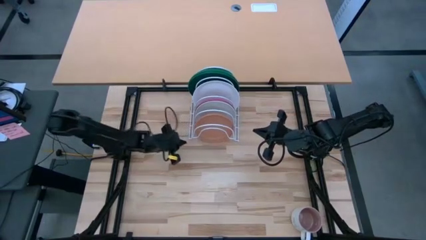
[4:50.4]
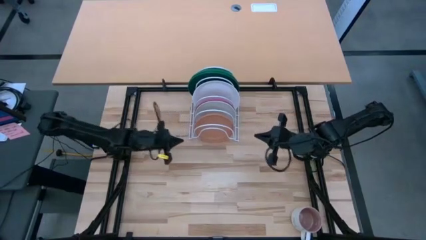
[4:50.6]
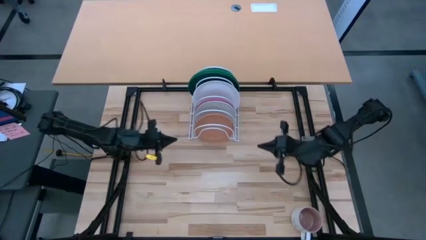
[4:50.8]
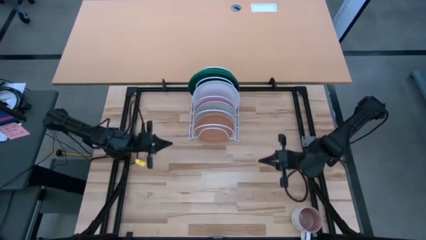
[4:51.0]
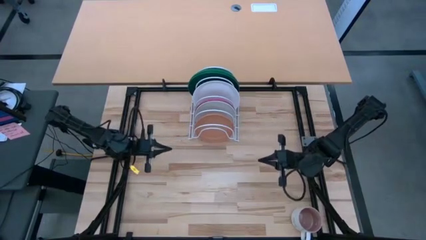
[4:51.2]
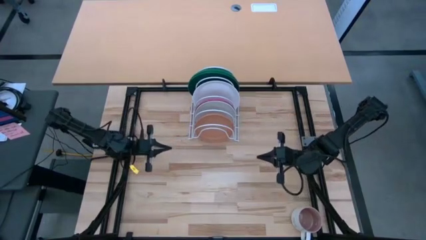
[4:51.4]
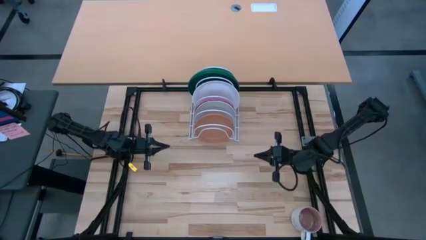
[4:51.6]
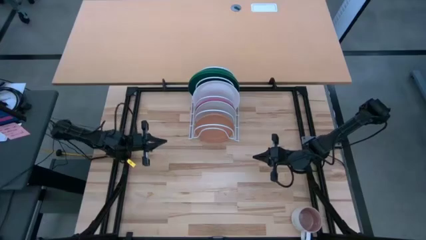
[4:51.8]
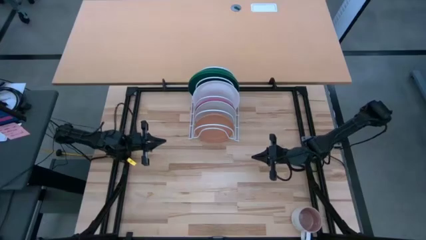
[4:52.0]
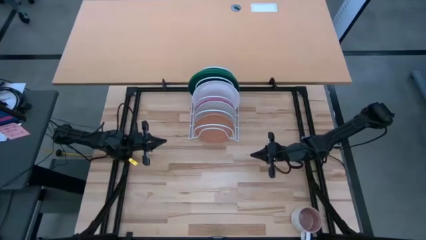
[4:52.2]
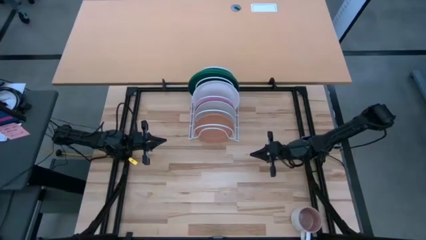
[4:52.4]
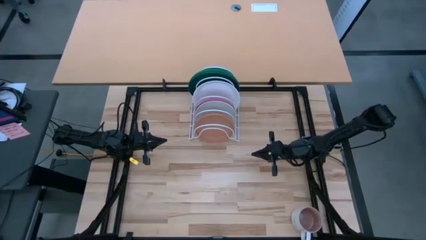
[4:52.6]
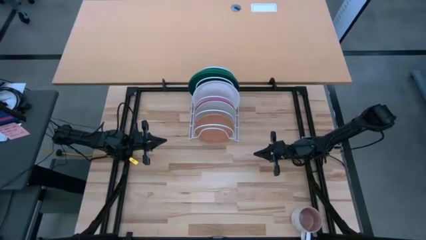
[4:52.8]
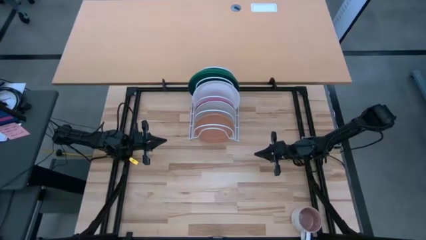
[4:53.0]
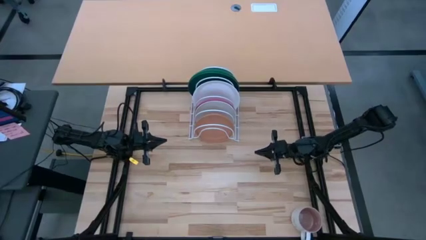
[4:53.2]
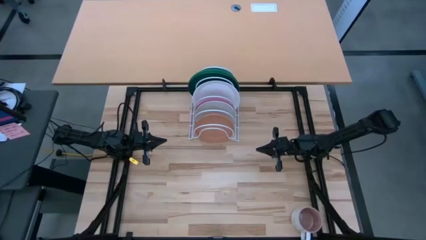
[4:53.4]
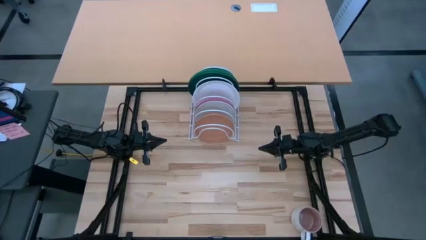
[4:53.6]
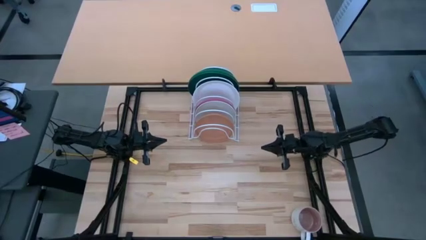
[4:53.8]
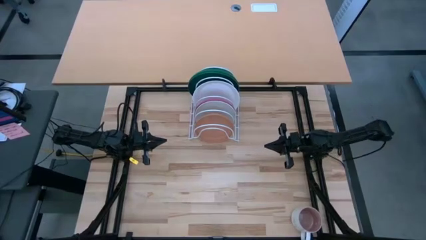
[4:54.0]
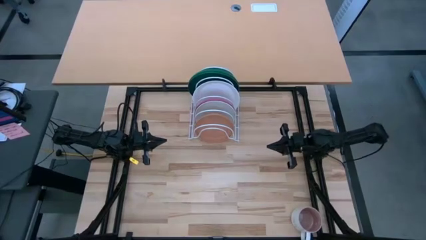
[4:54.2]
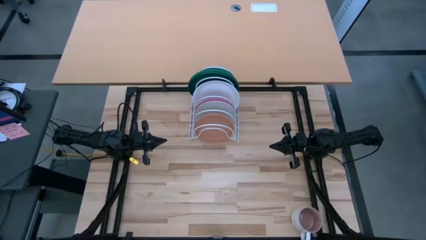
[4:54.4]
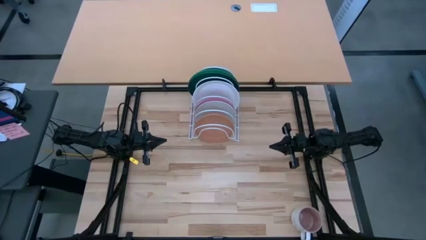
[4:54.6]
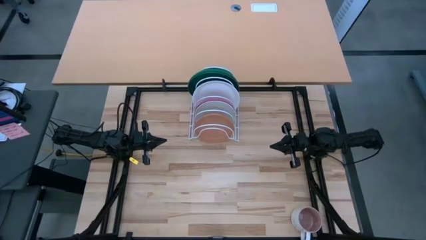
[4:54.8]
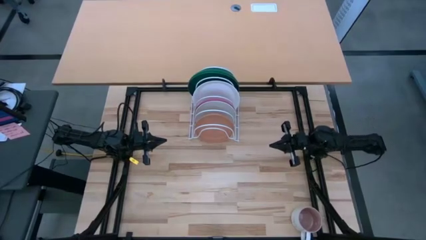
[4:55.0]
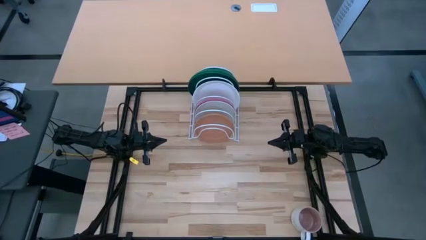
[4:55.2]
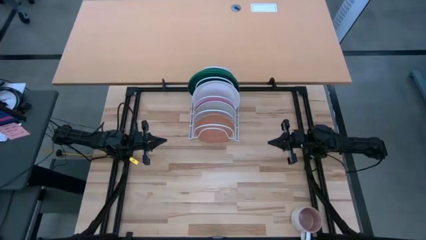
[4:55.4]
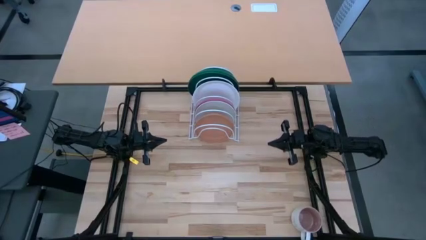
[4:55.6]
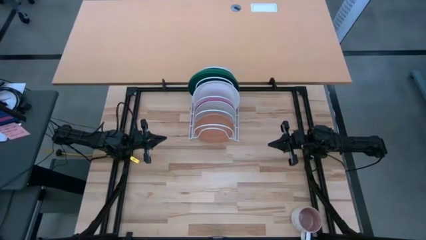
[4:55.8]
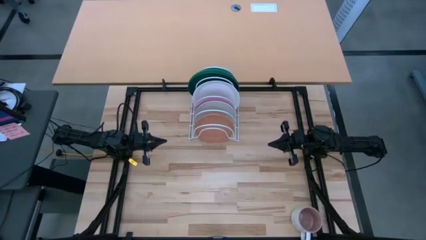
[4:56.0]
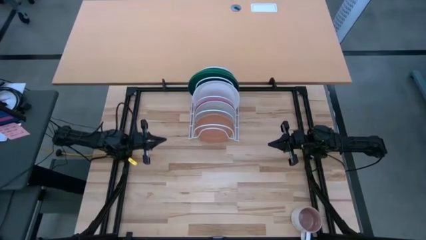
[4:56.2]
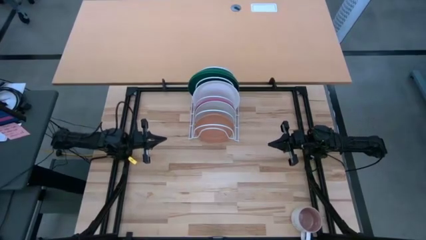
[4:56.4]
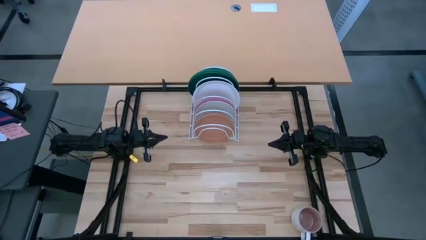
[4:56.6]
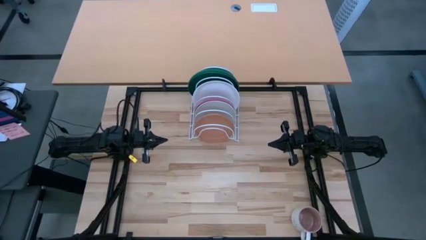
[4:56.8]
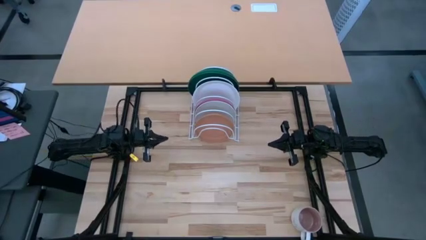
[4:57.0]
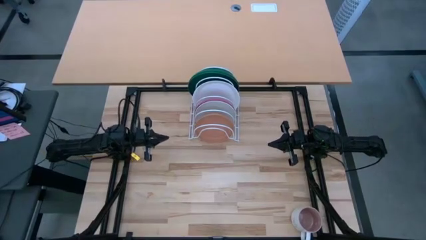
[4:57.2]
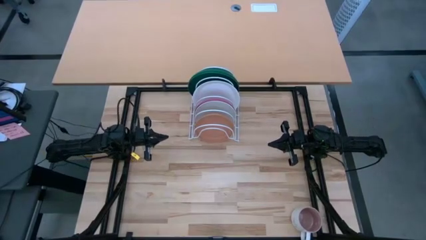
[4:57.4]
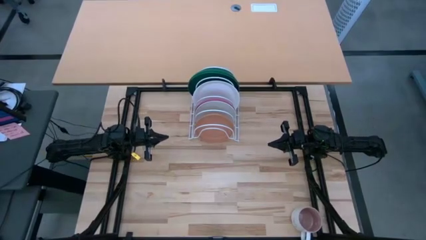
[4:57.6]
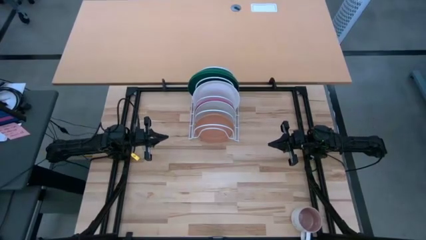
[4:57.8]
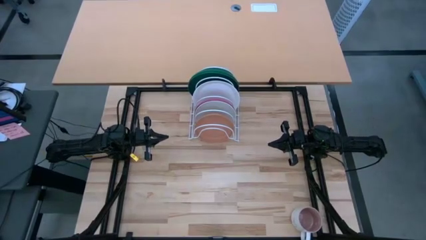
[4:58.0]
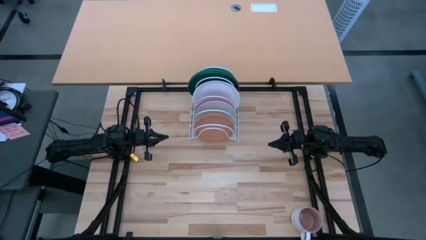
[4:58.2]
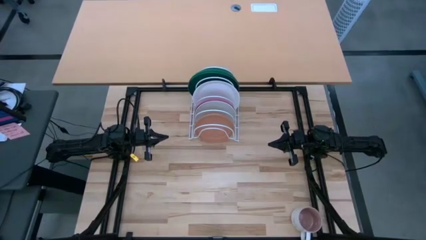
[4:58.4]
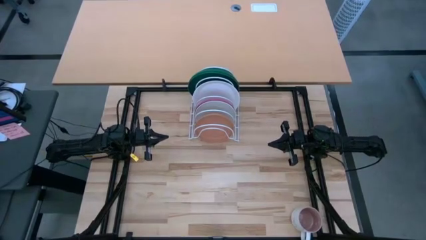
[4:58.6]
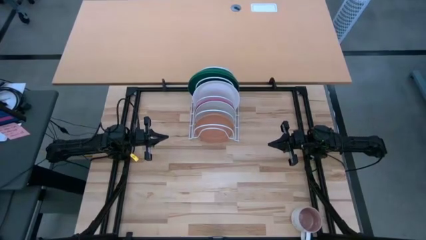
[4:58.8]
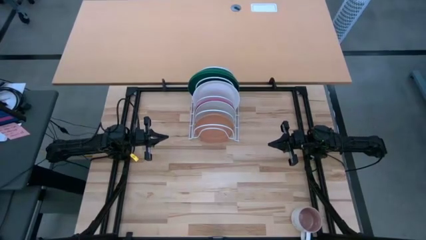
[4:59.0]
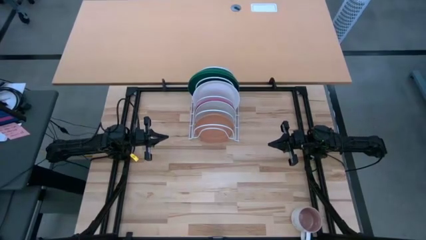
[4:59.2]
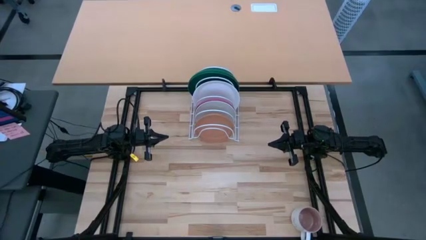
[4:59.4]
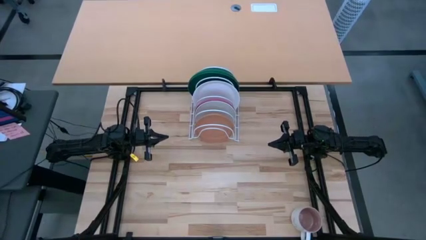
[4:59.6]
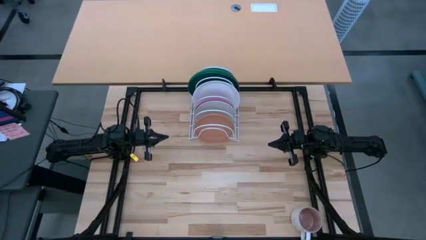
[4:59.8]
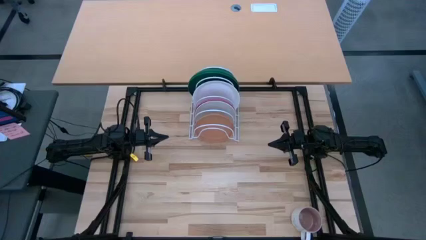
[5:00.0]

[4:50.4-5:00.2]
Task: Sort dishes
Return to Home Position

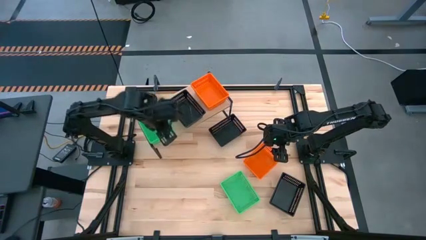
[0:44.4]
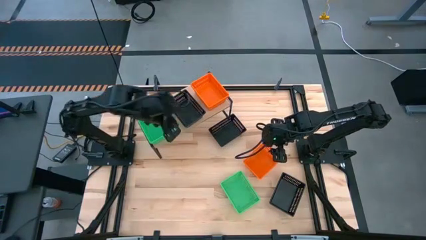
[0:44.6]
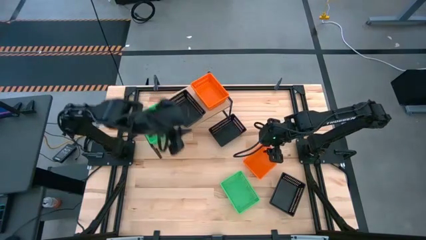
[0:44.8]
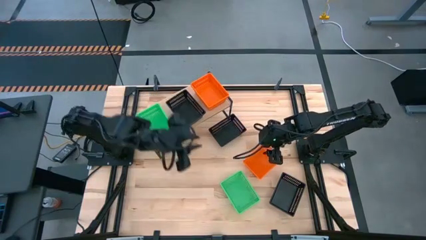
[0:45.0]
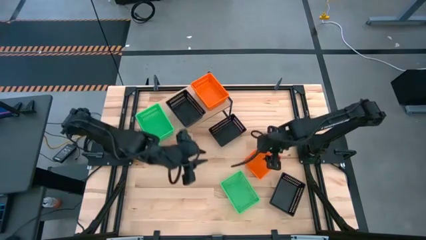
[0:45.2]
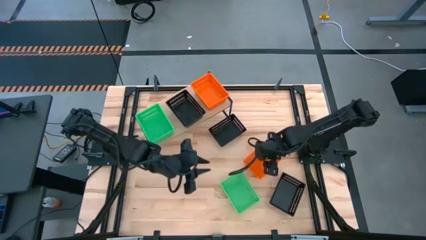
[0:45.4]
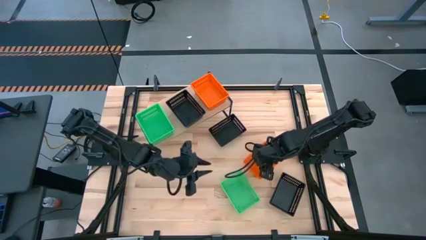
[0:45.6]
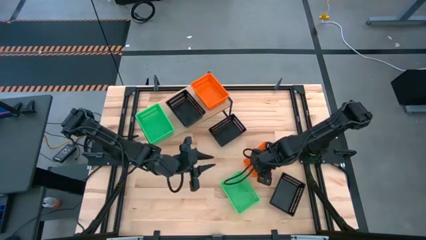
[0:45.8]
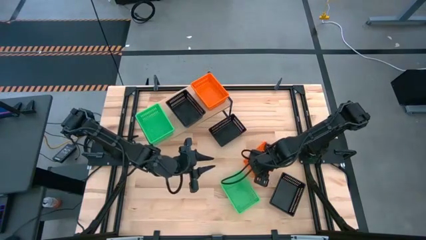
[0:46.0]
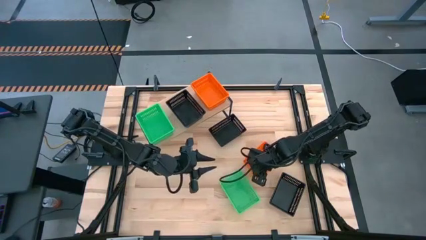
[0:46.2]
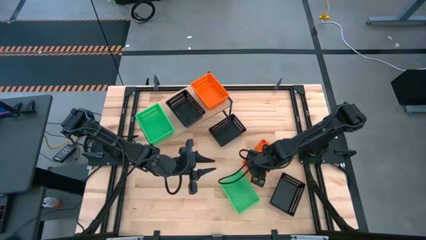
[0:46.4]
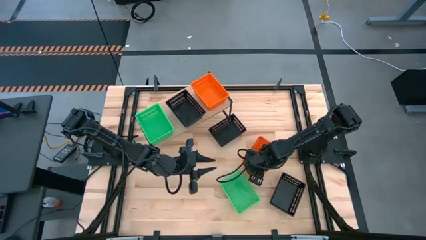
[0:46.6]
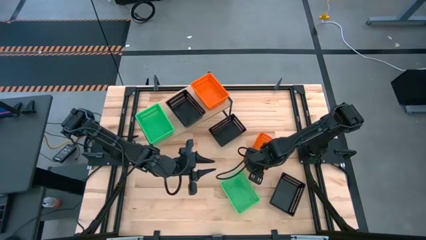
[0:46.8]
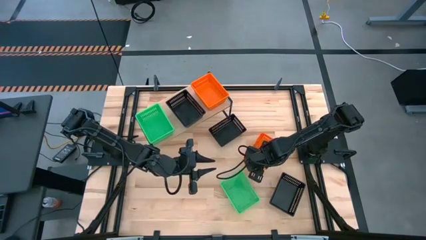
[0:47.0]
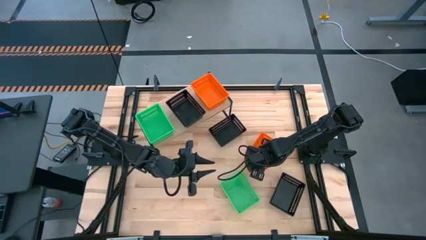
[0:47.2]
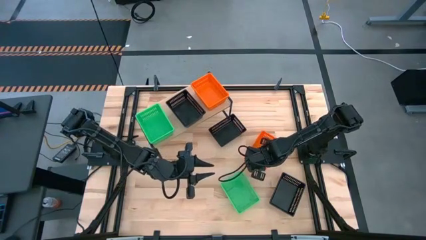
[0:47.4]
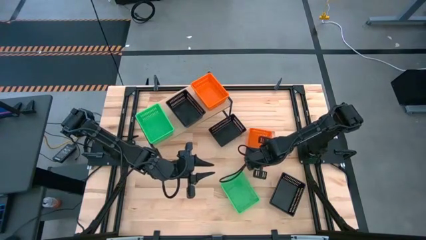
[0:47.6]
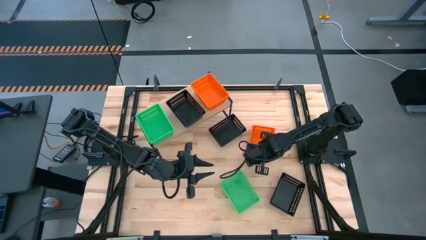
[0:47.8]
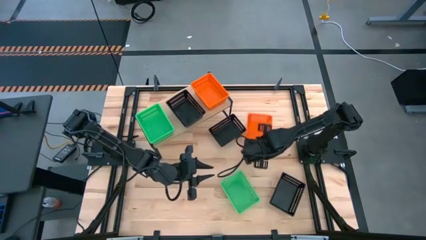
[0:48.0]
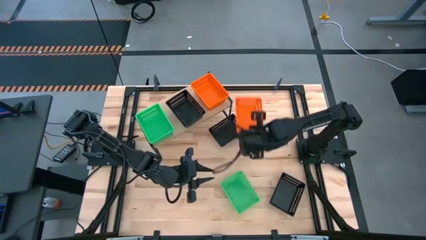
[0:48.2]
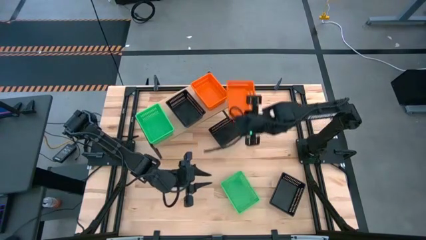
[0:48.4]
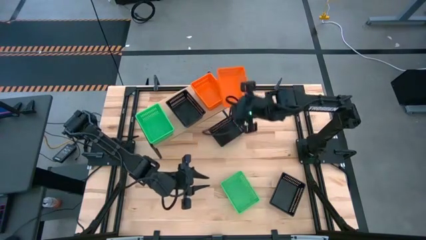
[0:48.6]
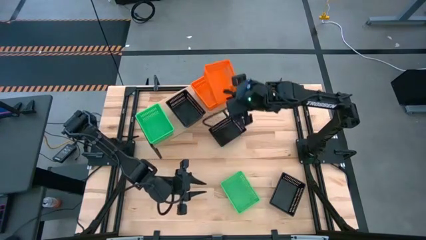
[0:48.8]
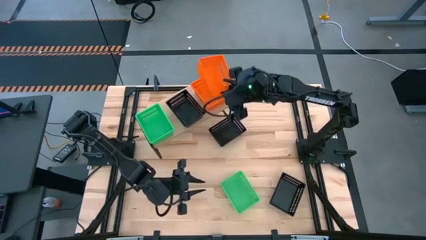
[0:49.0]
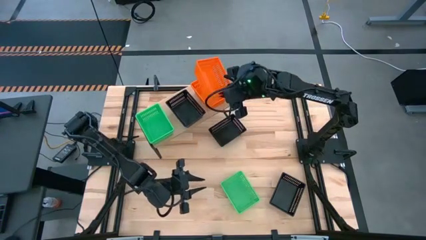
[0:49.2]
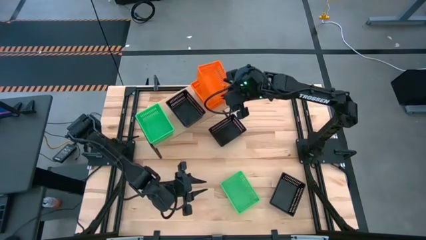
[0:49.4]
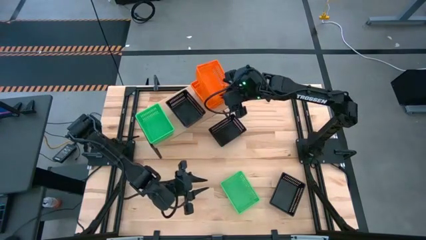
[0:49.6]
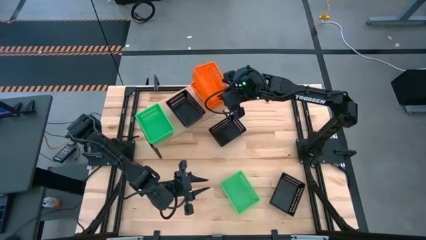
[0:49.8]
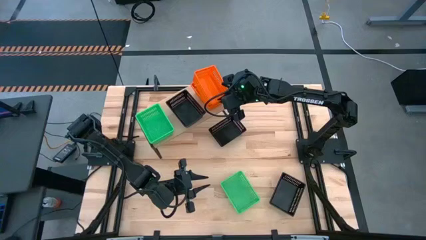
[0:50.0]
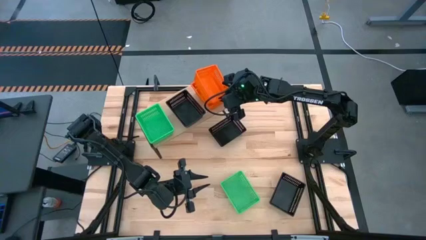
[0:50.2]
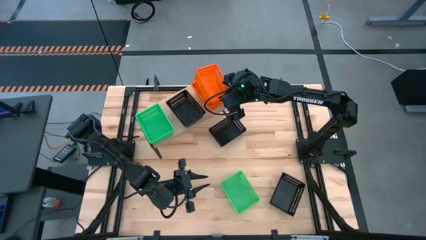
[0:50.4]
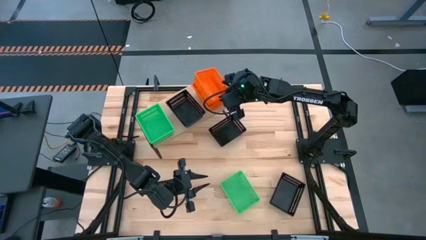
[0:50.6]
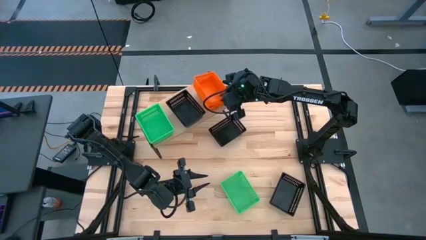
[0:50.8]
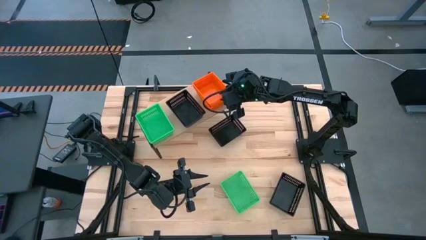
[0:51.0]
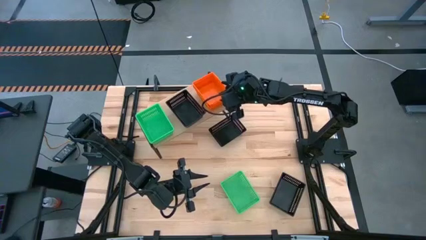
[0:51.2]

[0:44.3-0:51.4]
Task: Stack baskets on shelf by color
Stack the orange basket on the orange baskets on the shelf
